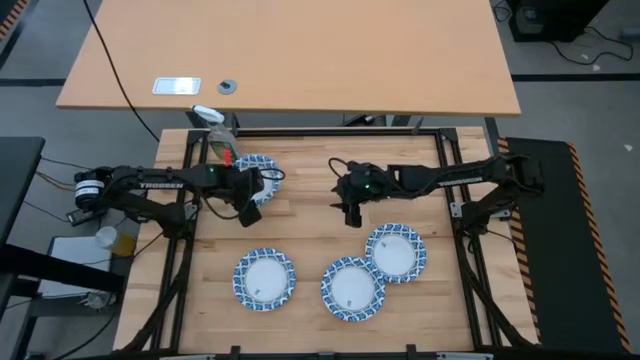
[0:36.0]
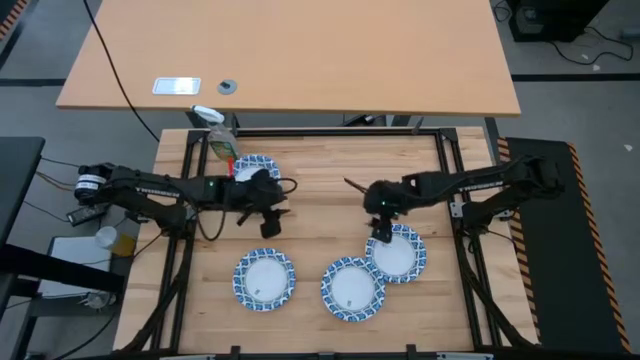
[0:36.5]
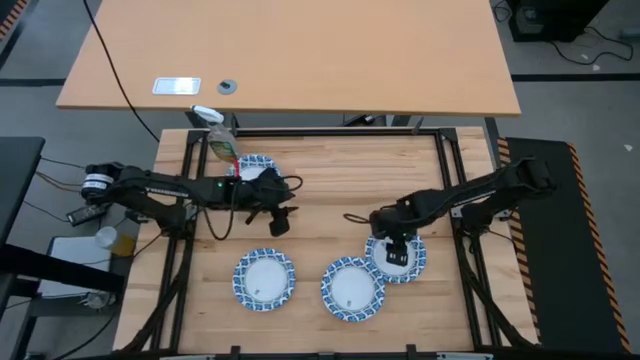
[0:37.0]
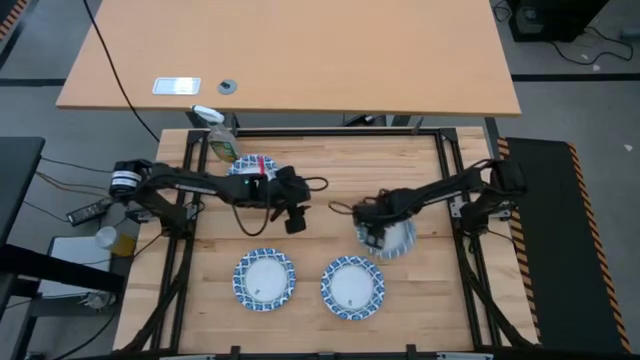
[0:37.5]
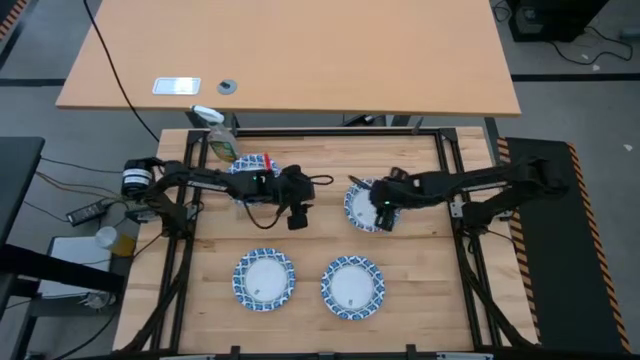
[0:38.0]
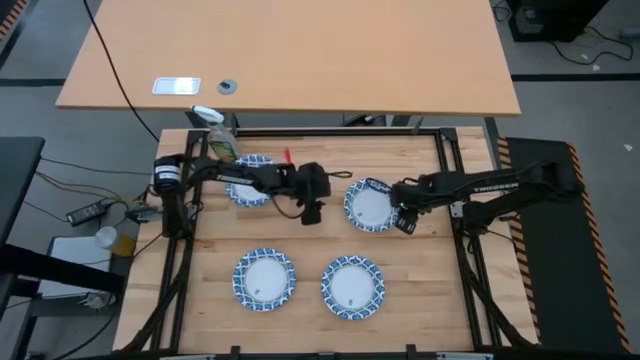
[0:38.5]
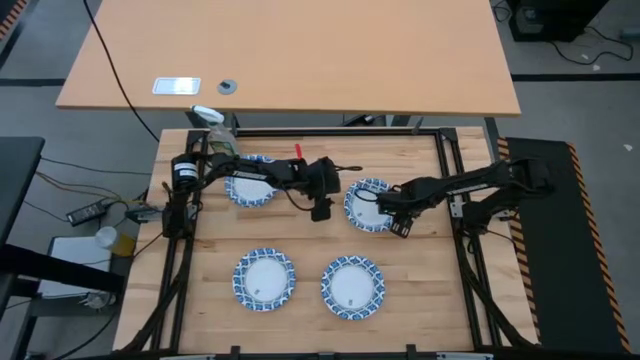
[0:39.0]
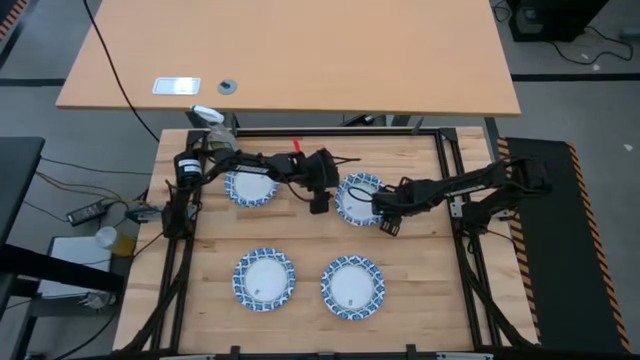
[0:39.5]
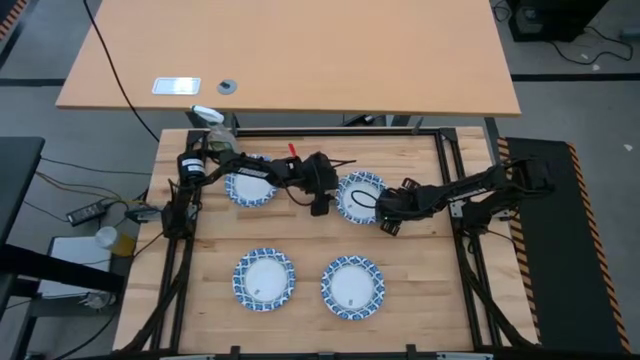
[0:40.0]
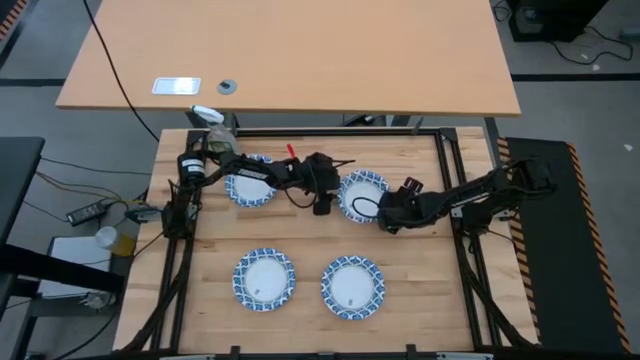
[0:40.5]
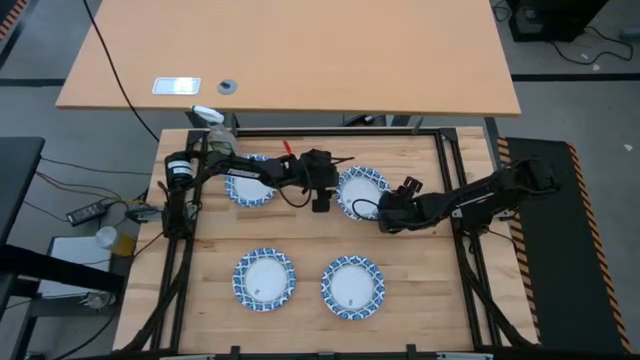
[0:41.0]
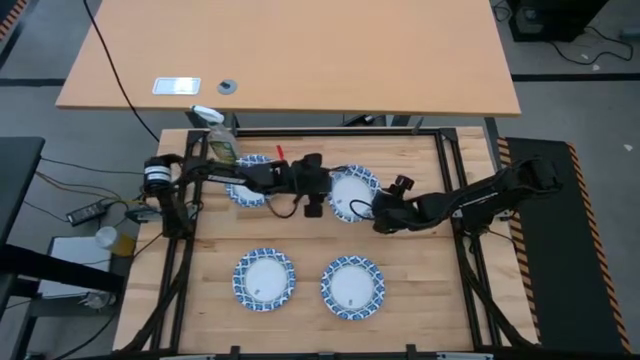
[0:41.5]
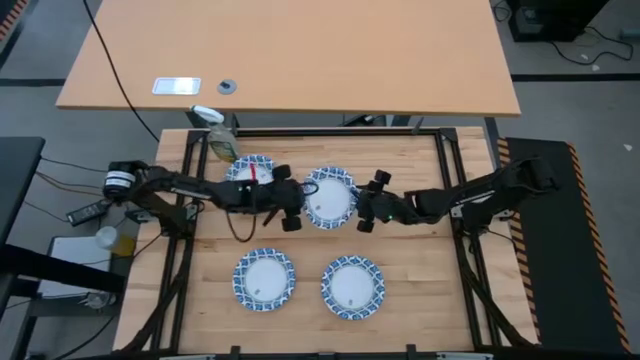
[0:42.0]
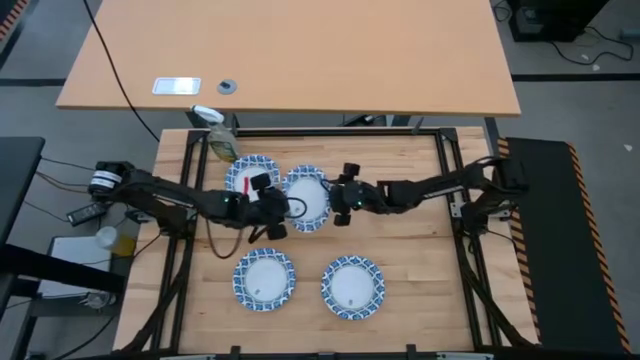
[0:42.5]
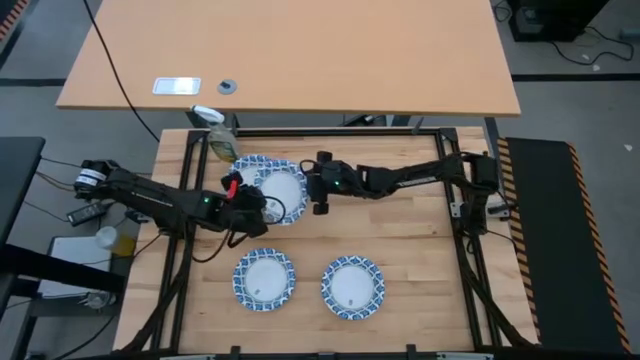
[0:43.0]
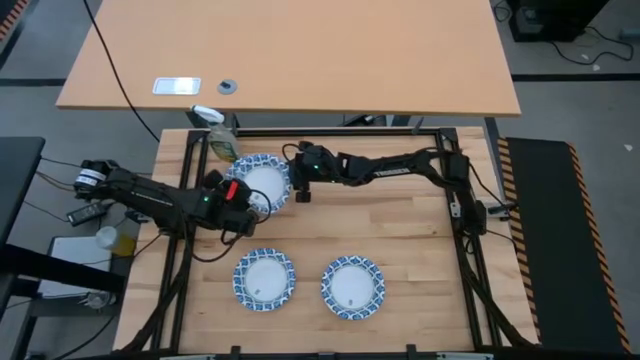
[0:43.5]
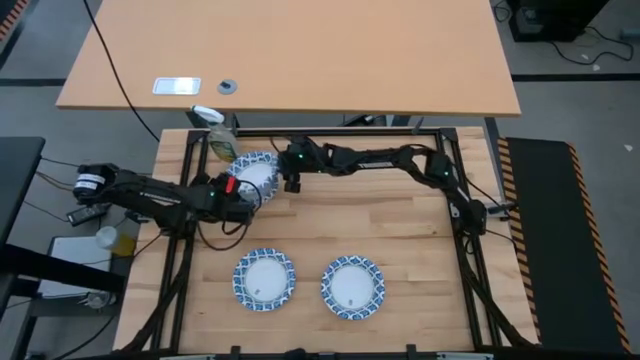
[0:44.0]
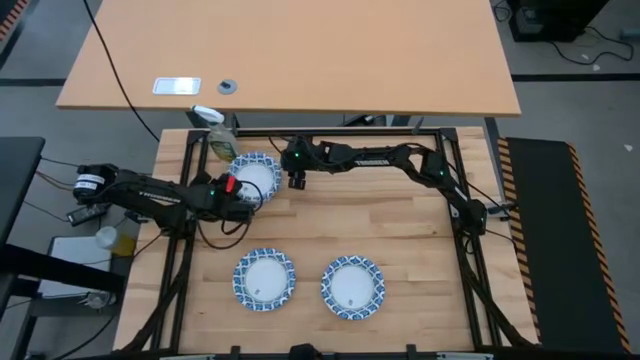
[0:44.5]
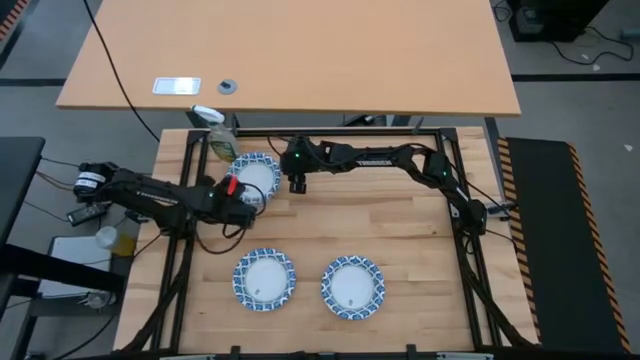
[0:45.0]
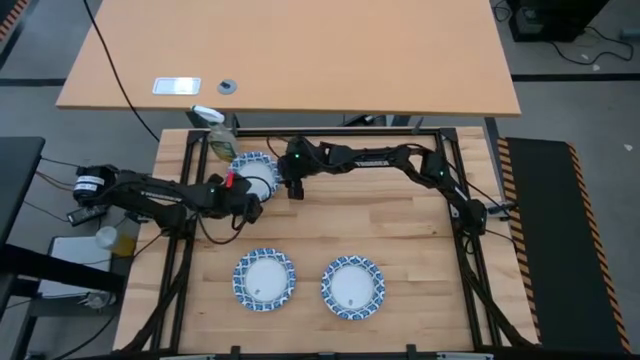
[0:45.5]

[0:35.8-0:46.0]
Stack the white bowl on top of the other white bowl

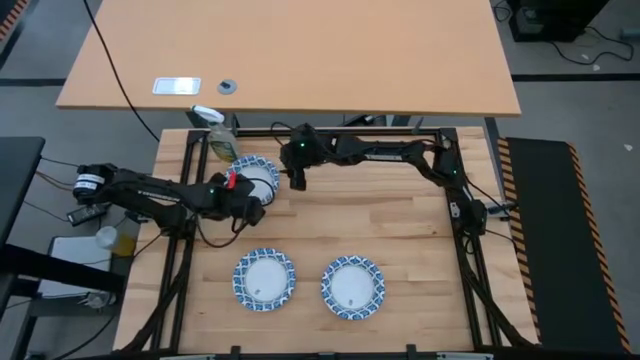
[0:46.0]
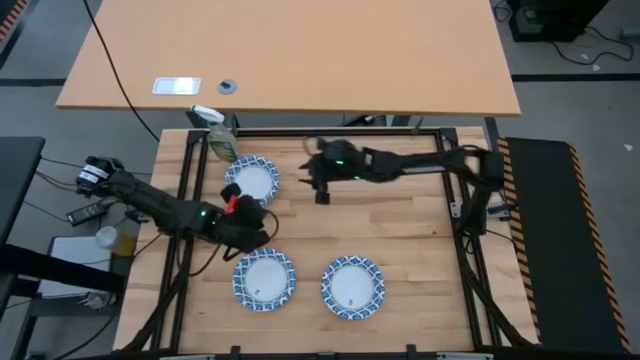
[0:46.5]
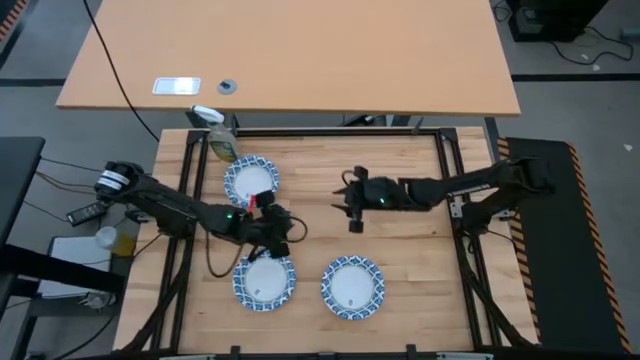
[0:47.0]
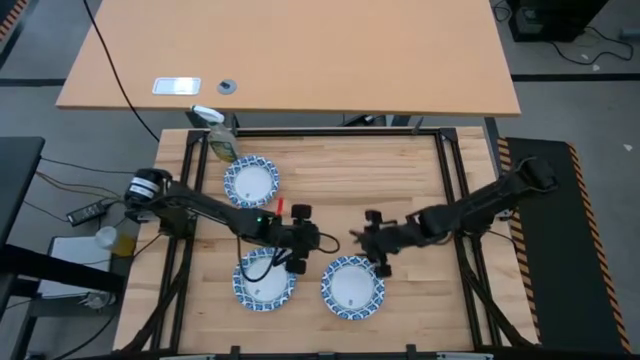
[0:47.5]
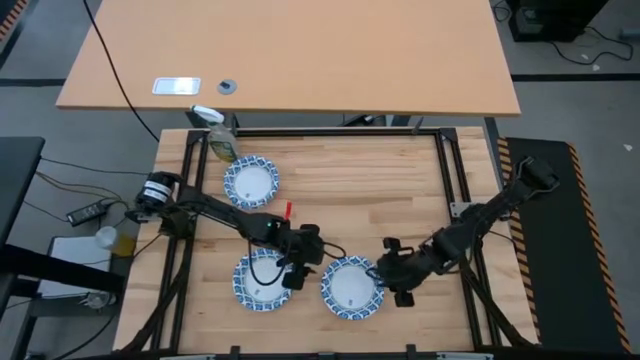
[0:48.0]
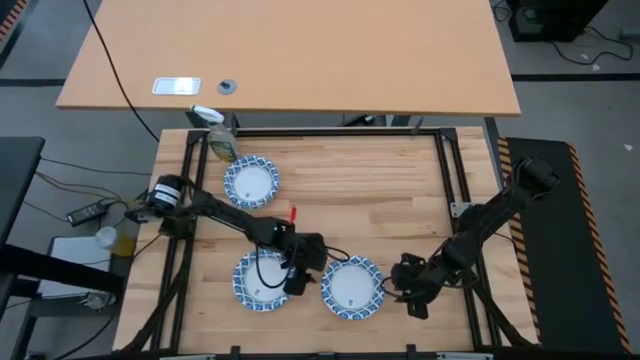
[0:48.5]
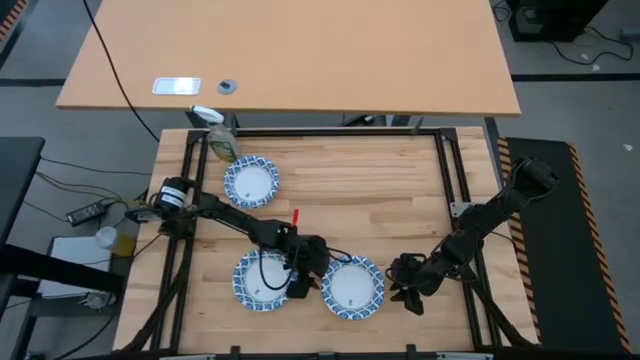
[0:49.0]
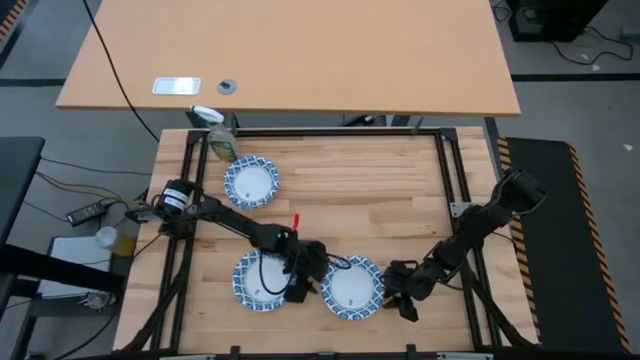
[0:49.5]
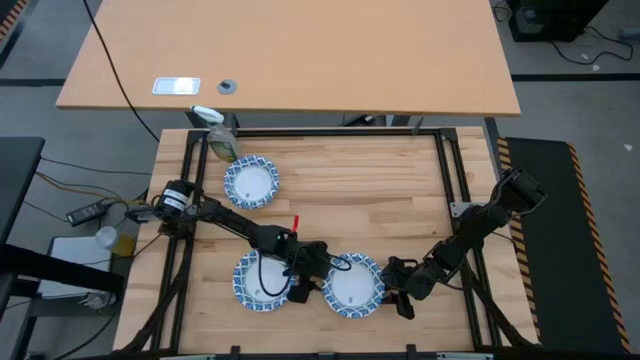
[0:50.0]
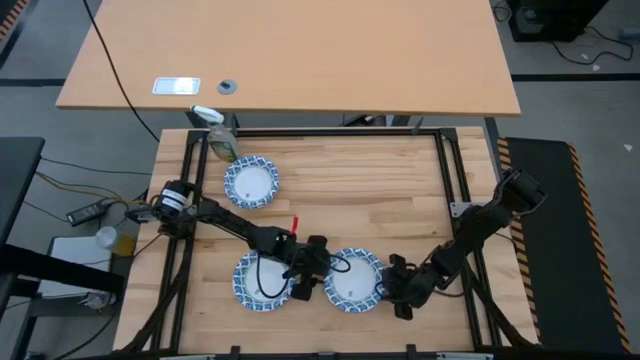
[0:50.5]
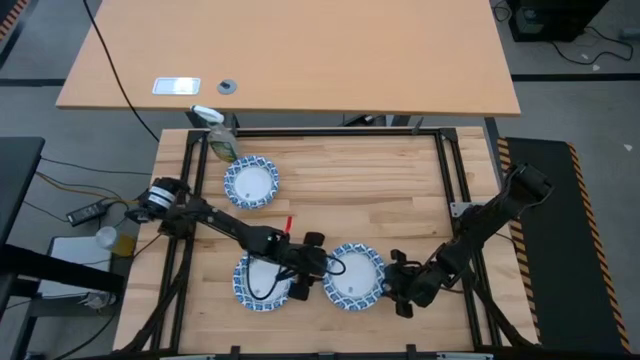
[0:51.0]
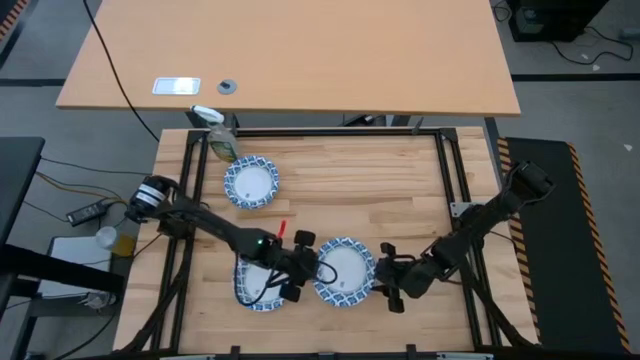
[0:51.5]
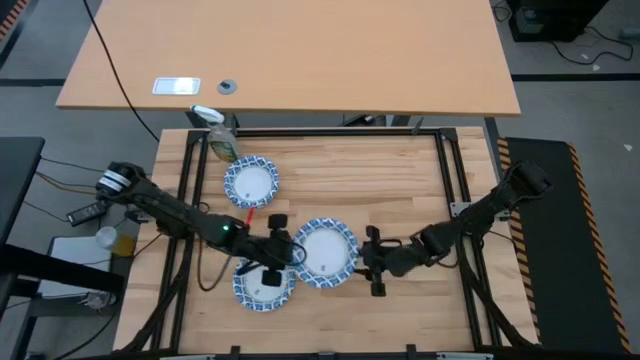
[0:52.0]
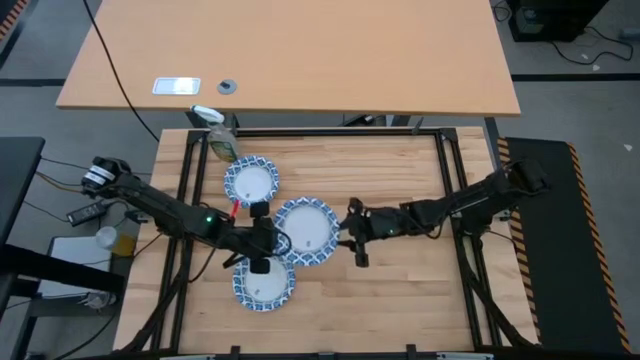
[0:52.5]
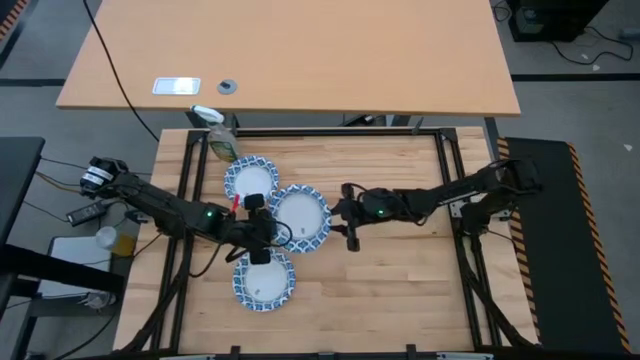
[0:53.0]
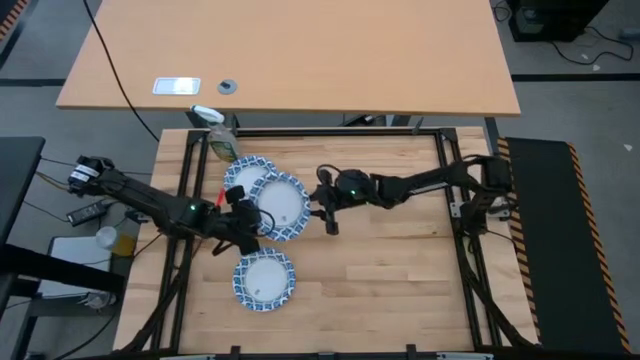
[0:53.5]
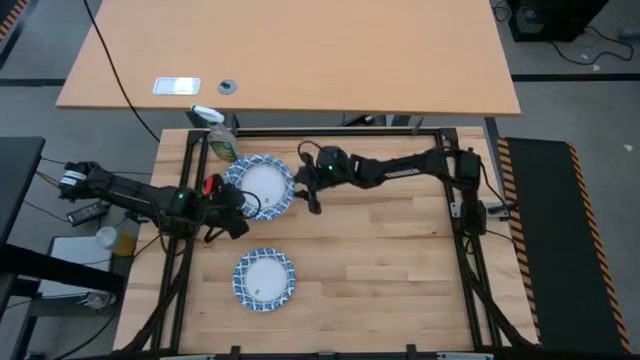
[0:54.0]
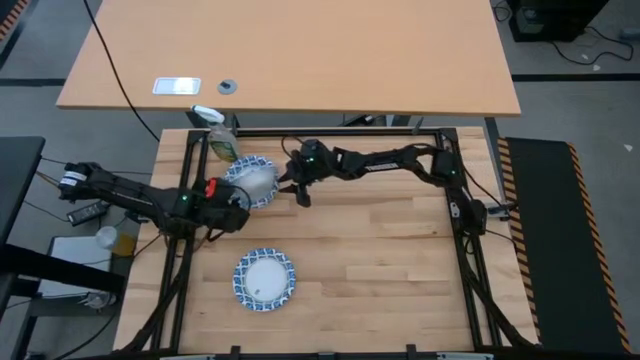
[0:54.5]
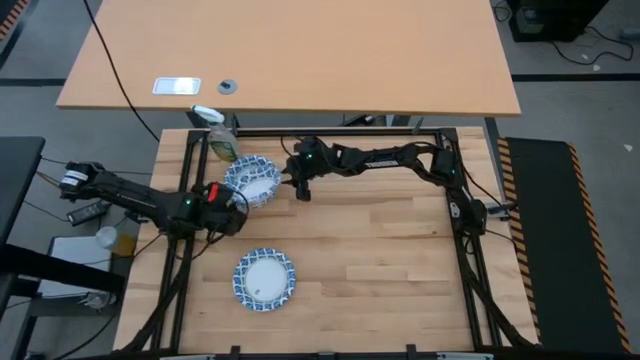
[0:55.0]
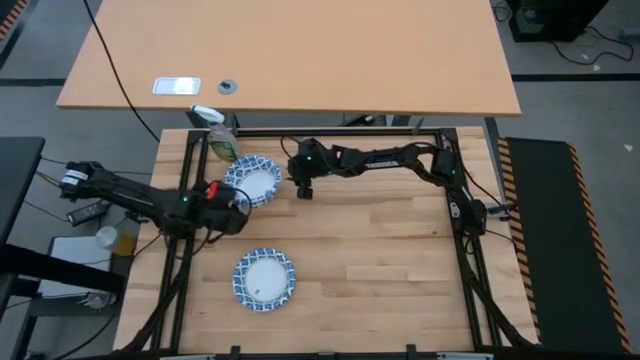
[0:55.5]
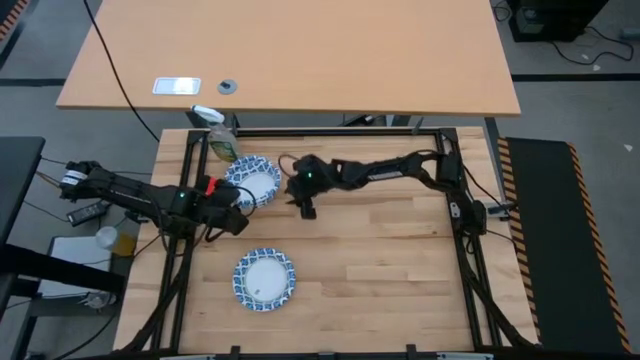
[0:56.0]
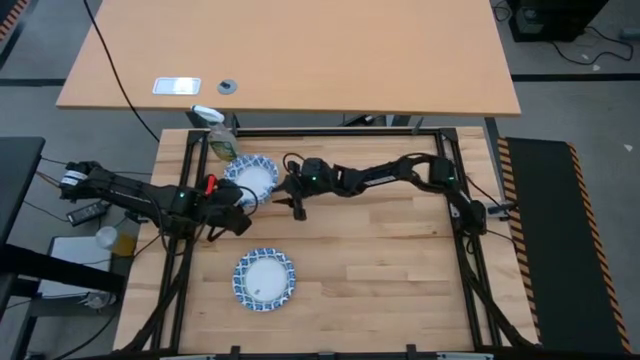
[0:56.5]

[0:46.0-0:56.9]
Stack the white bowl on top of the other white bowl
